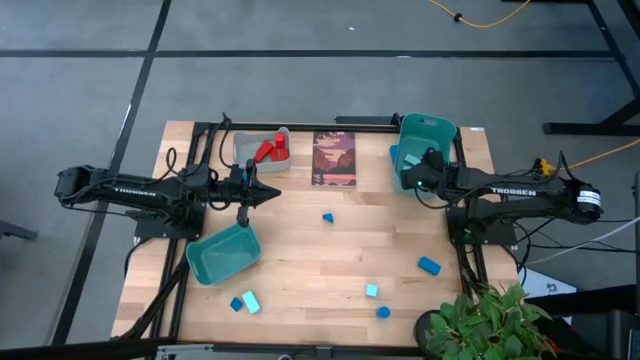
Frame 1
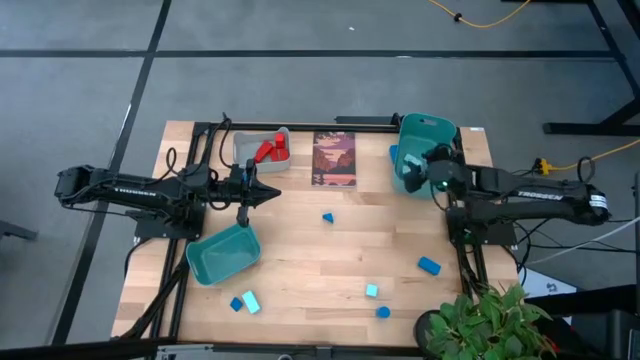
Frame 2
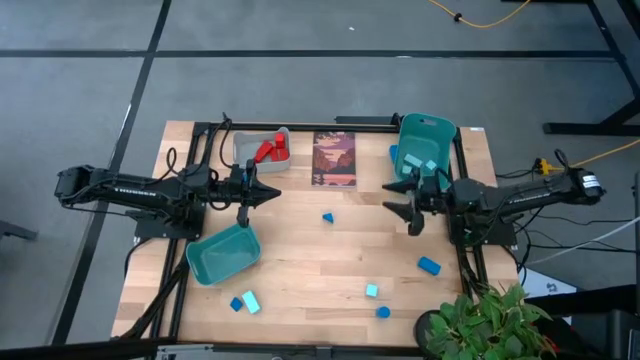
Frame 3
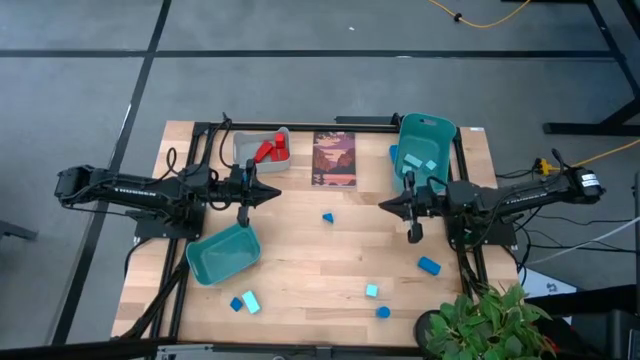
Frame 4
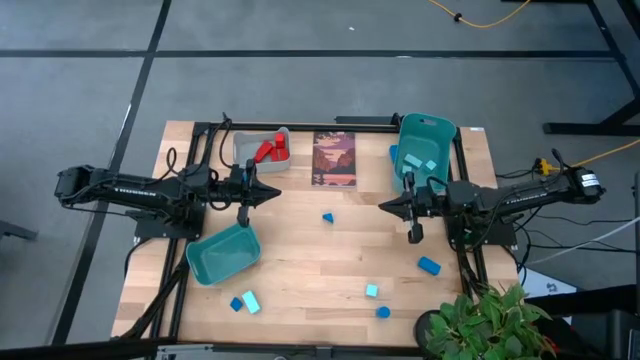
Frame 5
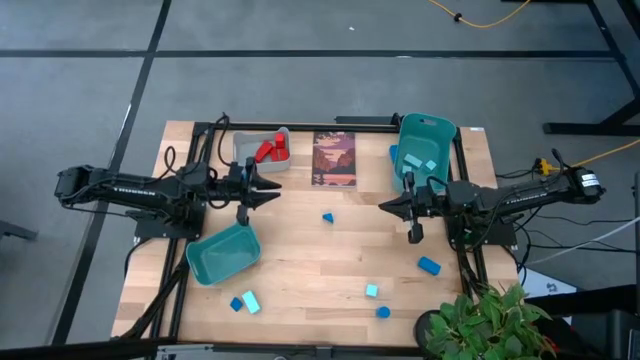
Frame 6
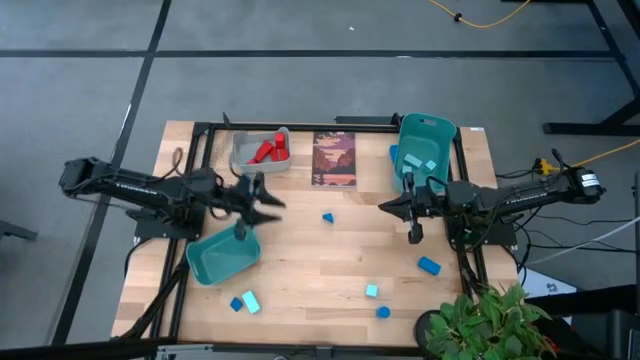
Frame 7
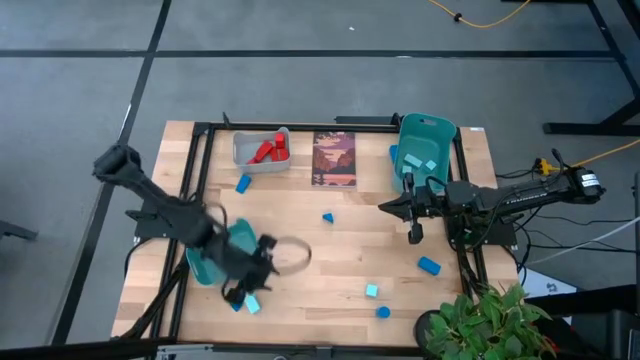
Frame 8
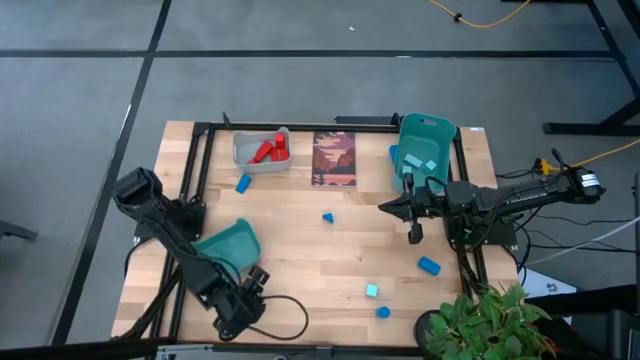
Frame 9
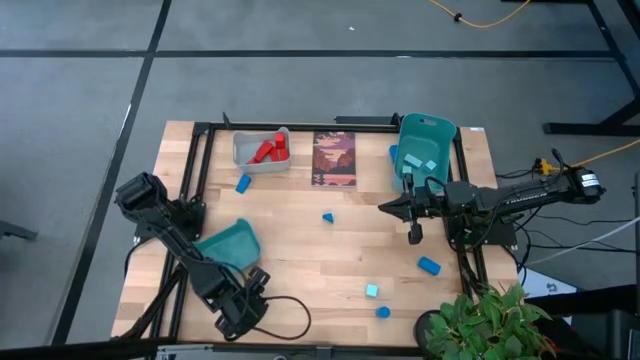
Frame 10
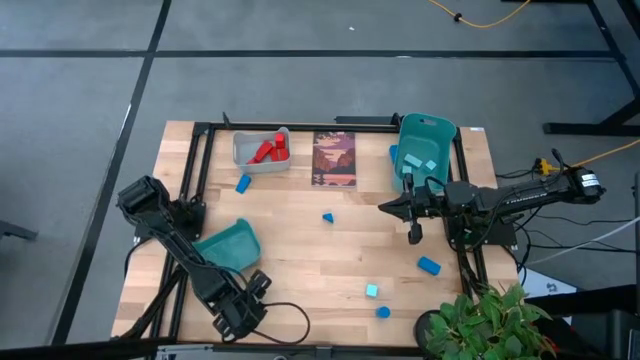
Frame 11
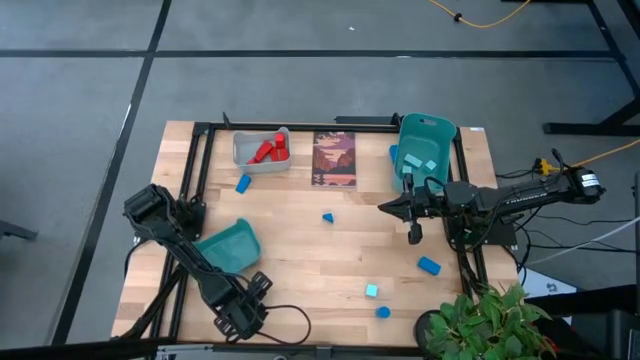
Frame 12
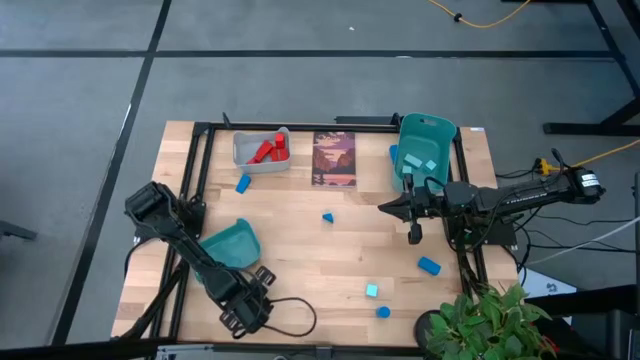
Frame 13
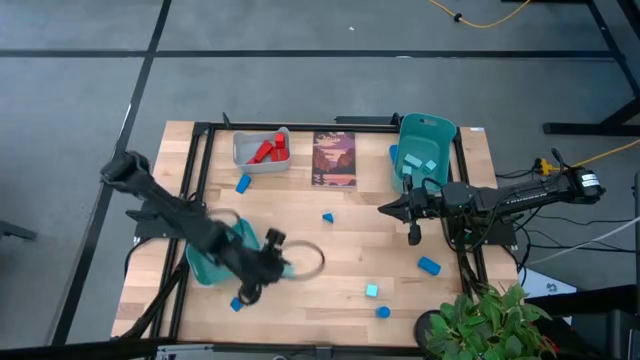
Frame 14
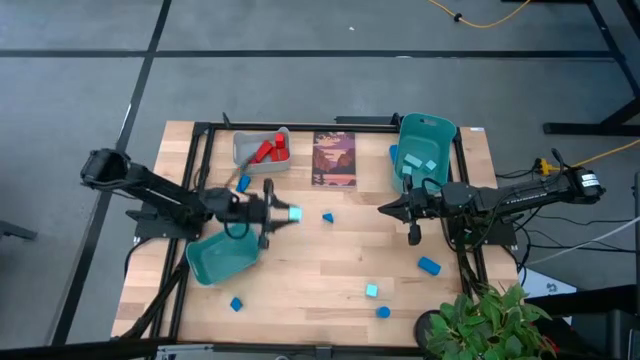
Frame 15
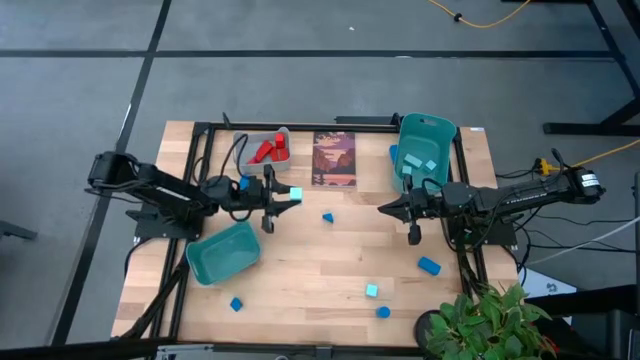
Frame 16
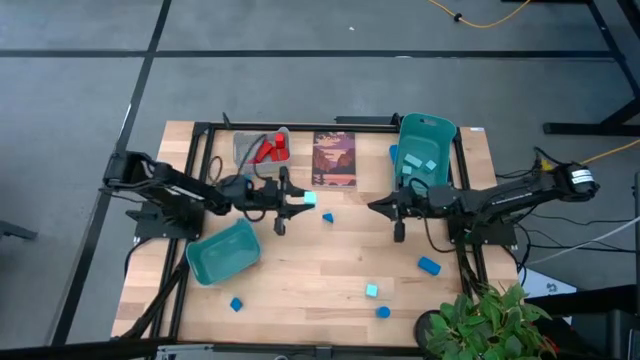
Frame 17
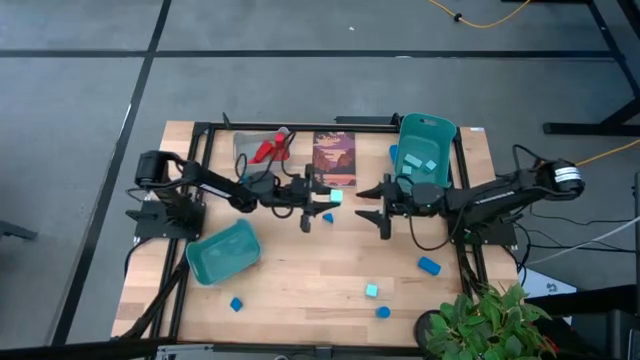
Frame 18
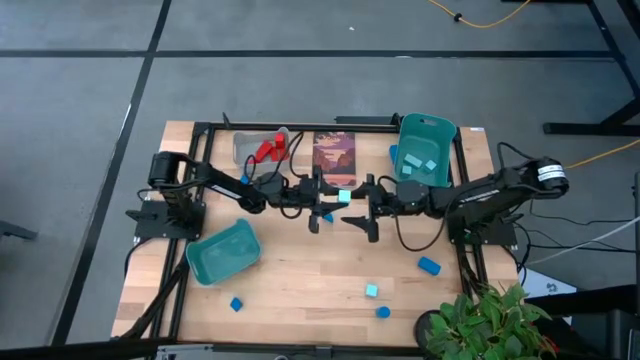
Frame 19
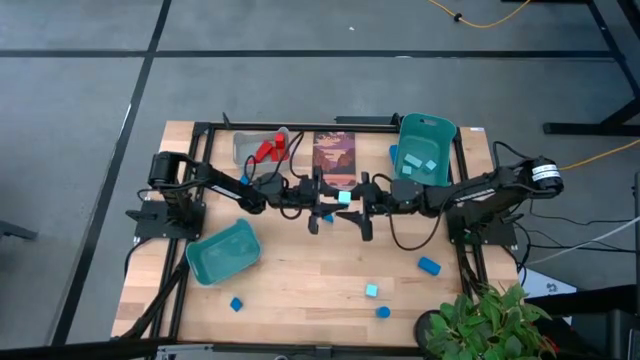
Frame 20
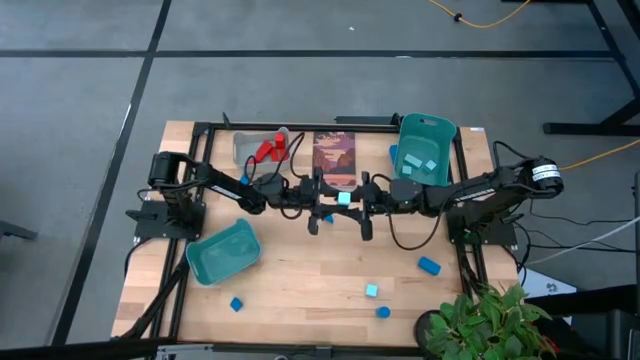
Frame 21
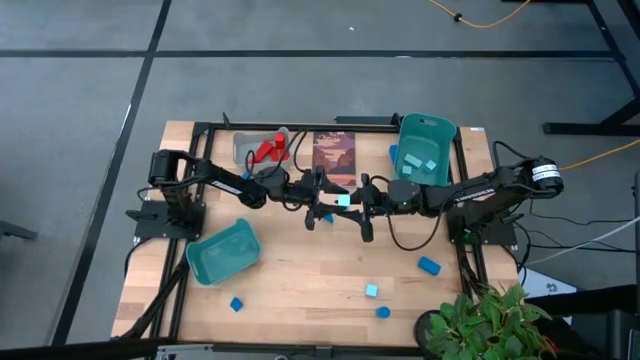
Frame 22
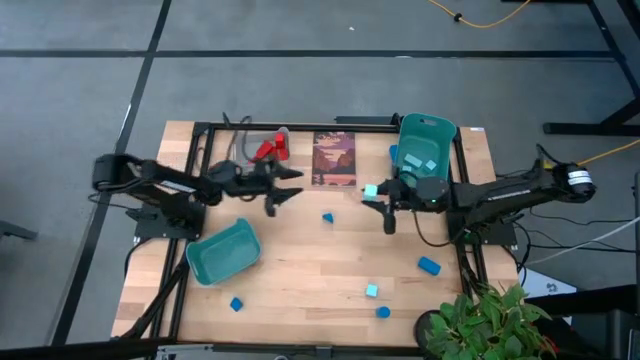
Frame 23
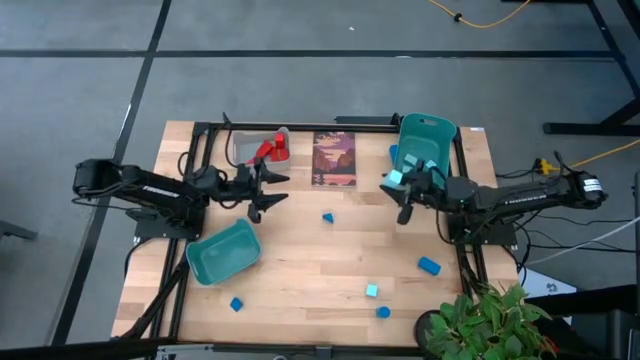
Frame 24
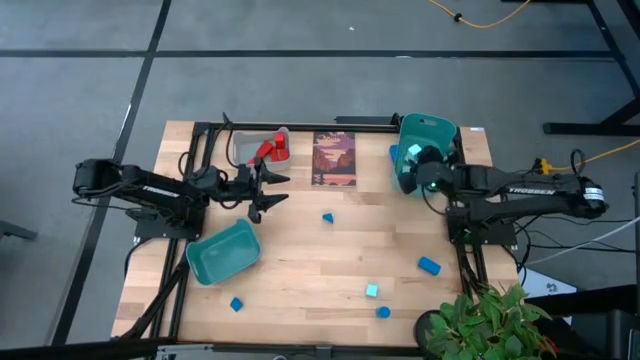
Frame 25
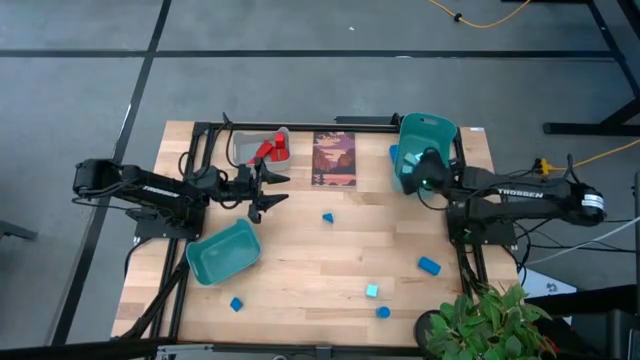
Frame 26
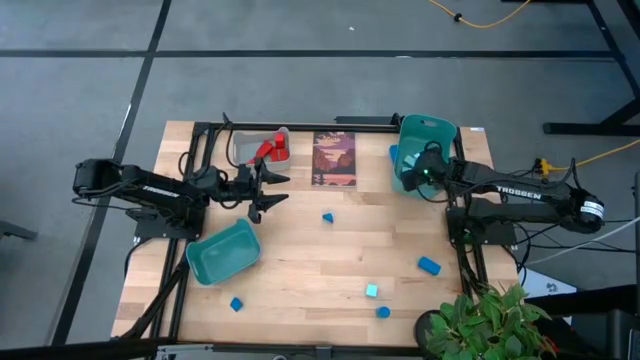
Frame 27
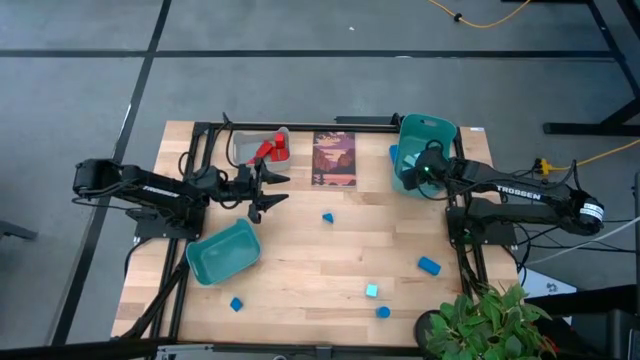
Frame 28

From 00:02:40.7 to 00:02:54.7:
Task: Sort & place blocks by color
Put the light blue block into the right green bin

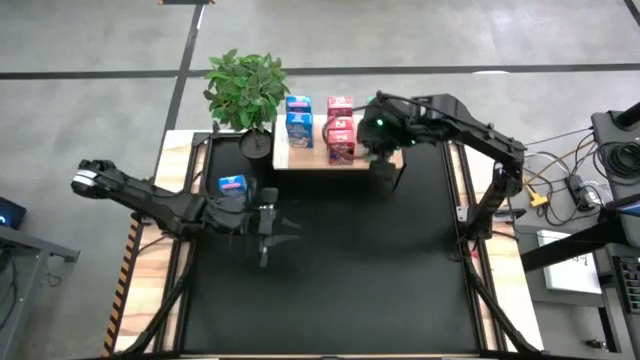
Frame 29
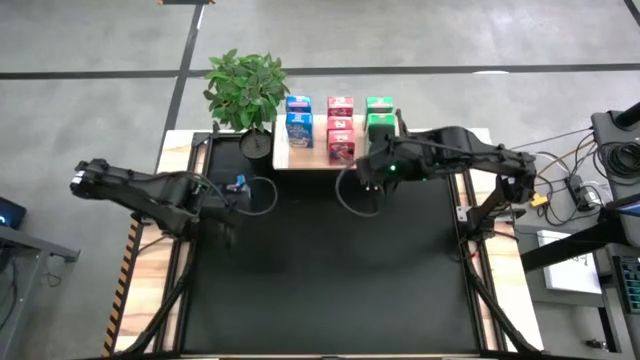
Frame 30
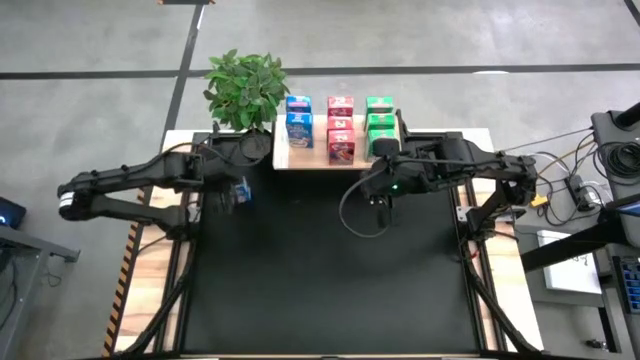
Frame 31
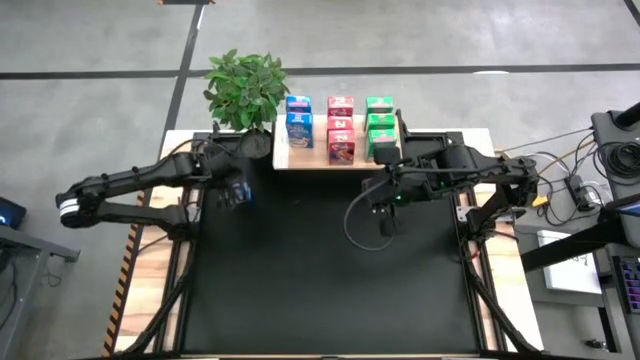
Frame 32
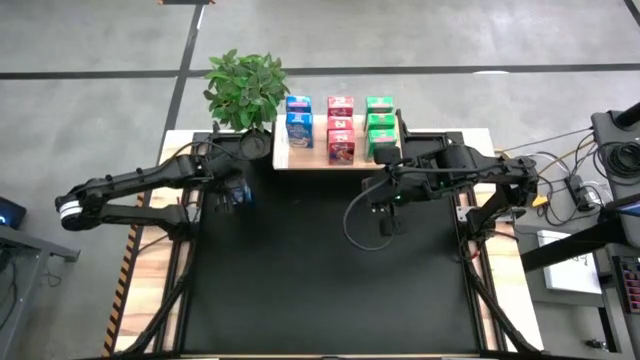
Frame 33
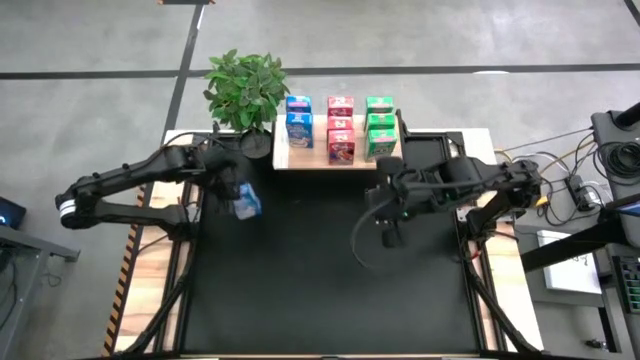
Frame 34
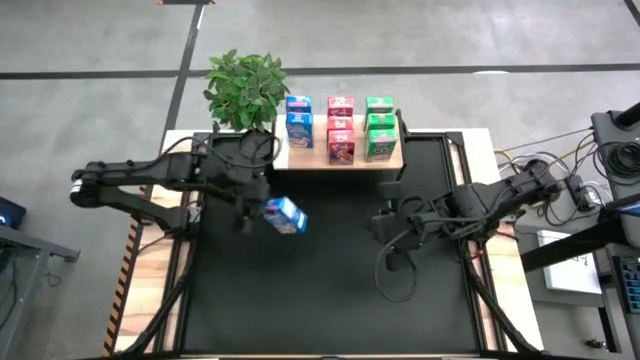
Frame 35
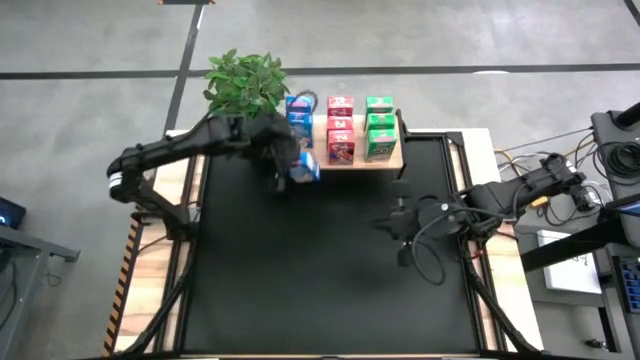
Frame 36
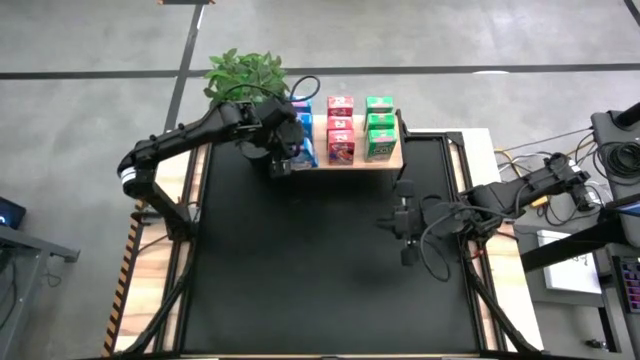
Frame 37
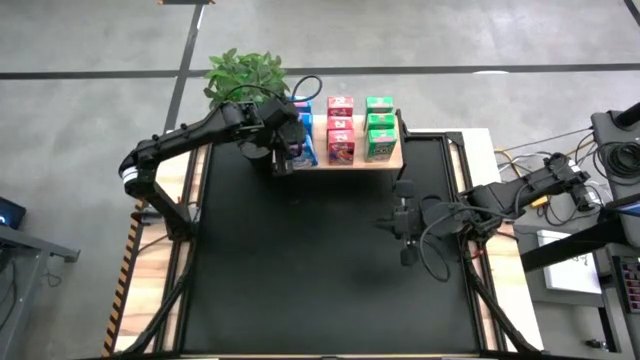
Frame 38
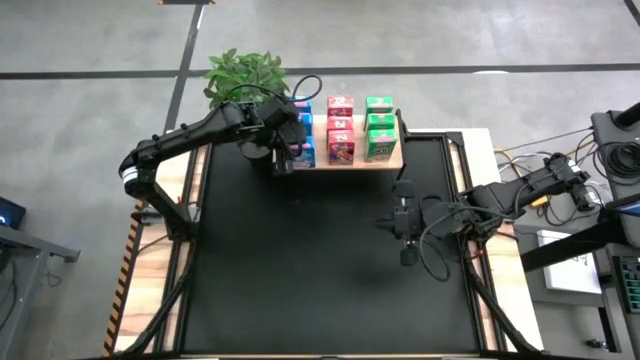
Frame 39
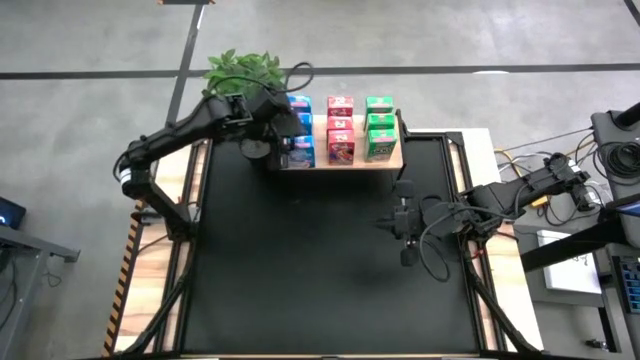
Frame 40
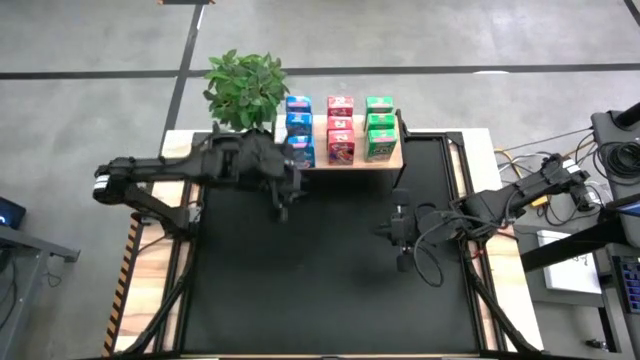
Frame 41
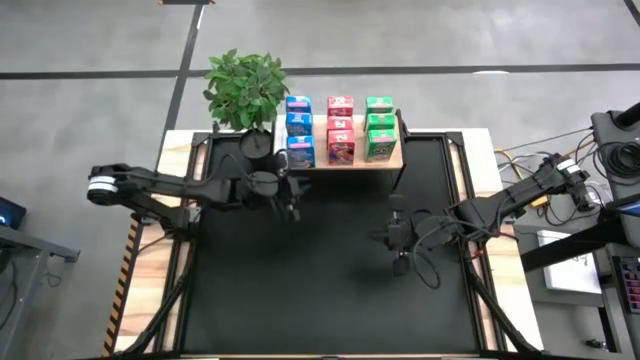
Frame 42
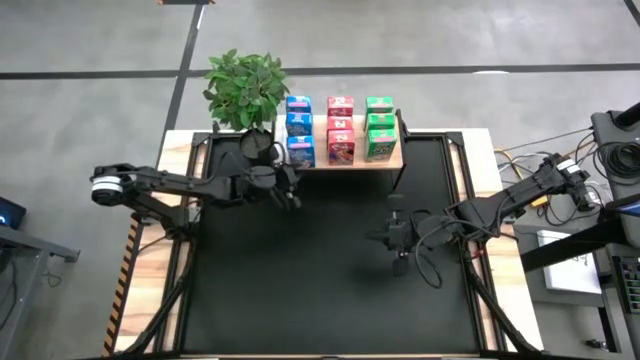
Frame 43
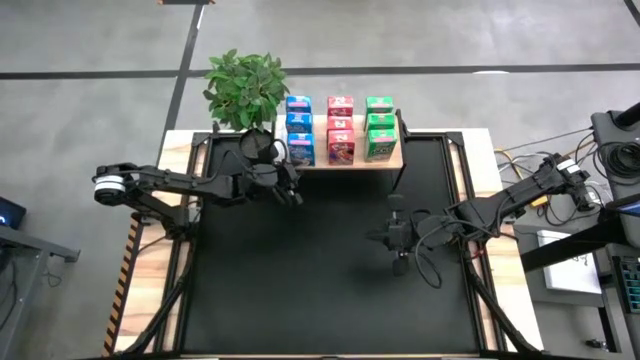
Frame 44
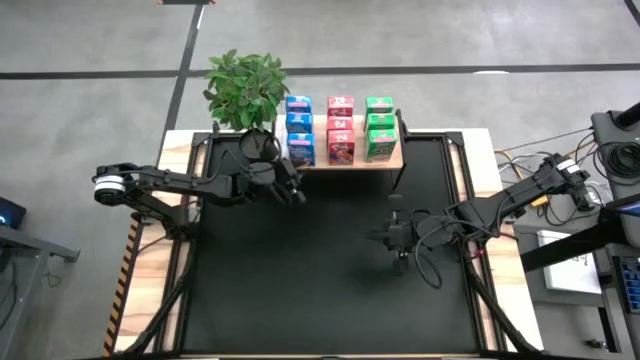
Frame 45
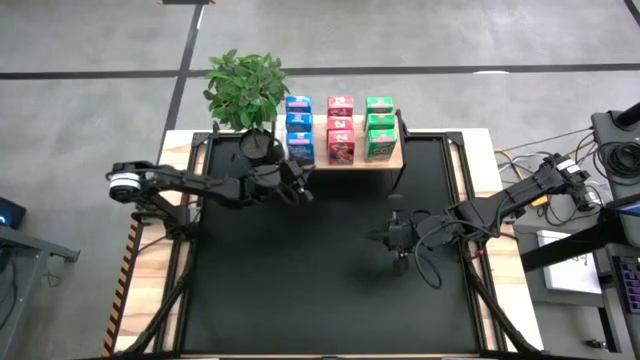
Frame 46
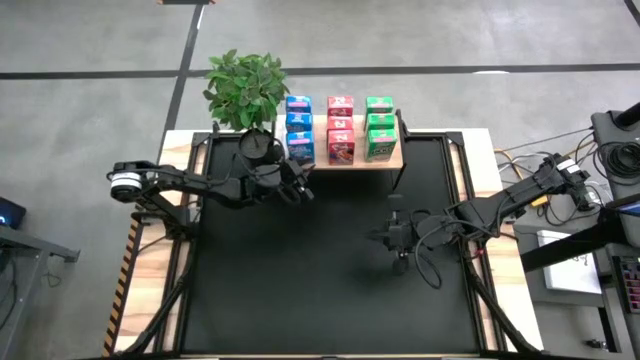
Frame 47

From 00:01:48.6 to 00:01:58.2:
Task: Stack cereal on shelf
Put the blue cereal box aligned with the other blue cereal boxes on the shelf
